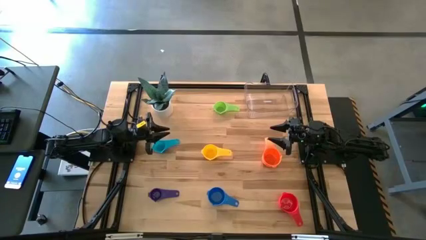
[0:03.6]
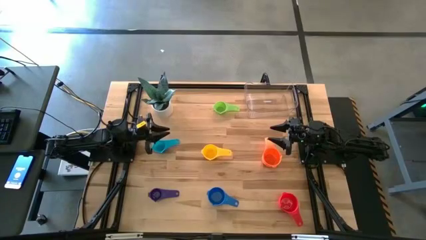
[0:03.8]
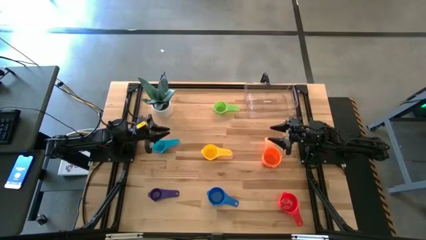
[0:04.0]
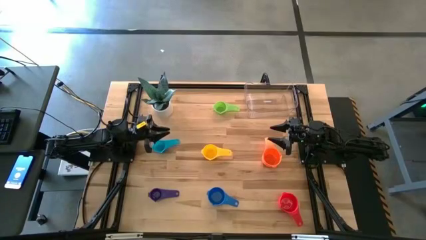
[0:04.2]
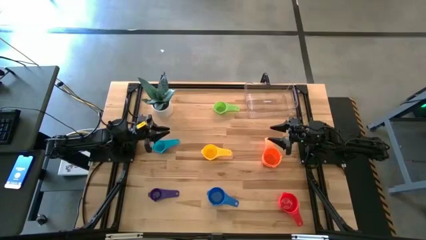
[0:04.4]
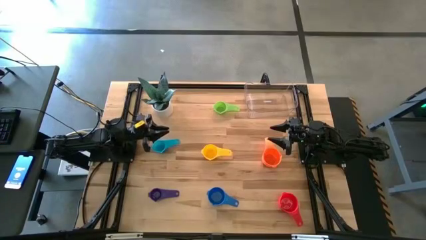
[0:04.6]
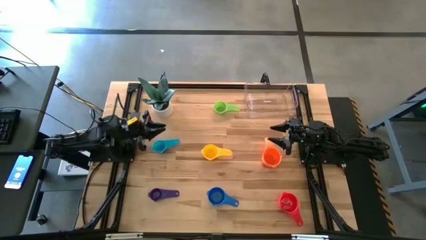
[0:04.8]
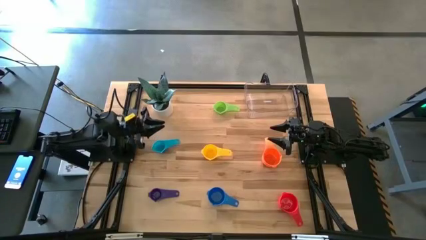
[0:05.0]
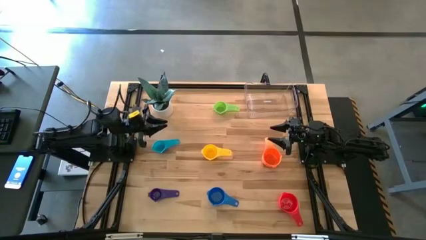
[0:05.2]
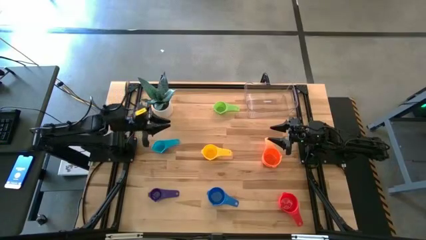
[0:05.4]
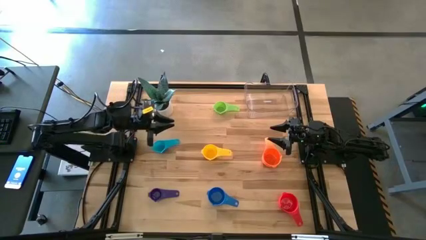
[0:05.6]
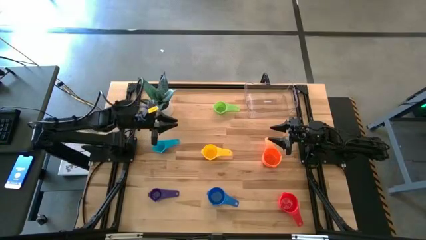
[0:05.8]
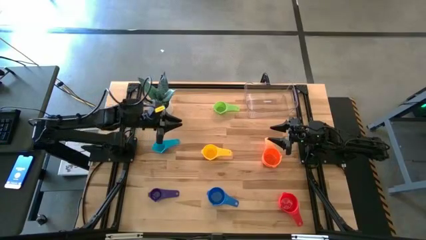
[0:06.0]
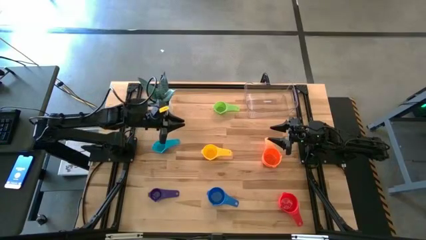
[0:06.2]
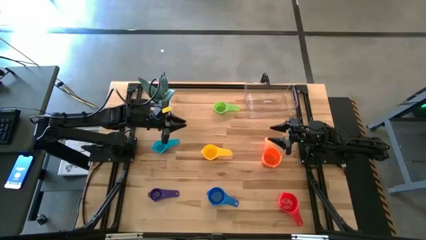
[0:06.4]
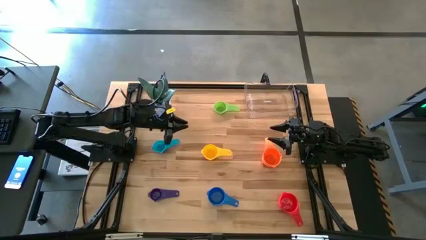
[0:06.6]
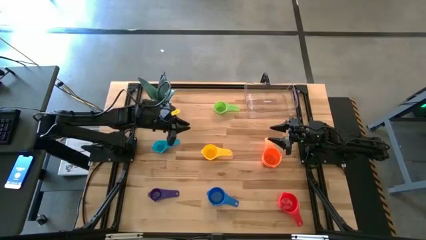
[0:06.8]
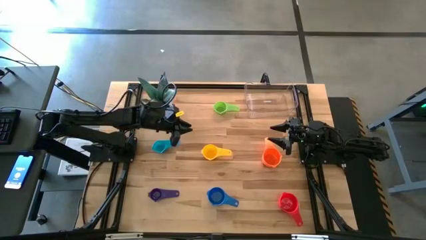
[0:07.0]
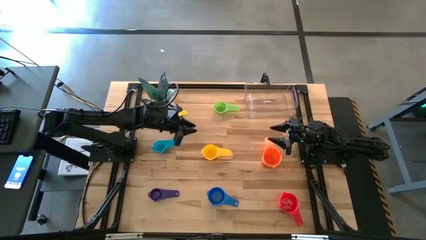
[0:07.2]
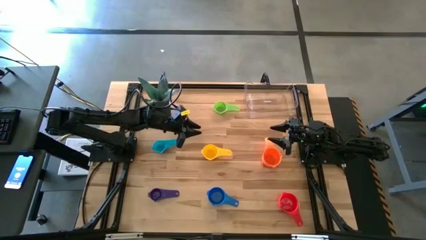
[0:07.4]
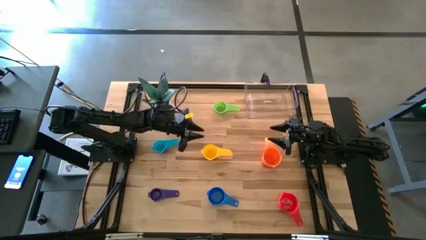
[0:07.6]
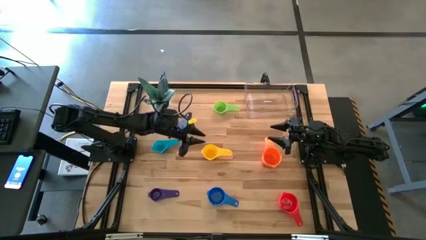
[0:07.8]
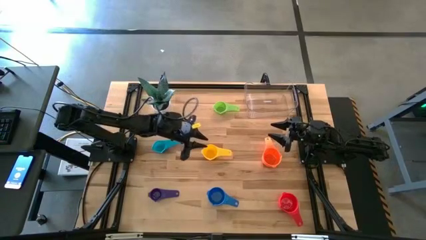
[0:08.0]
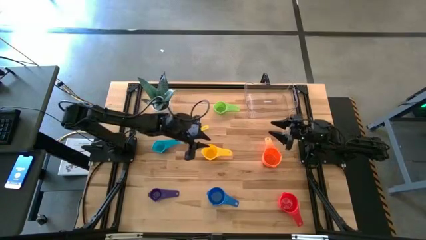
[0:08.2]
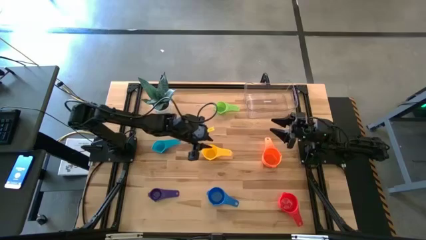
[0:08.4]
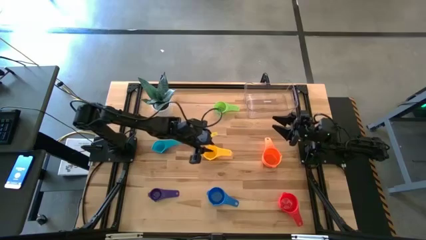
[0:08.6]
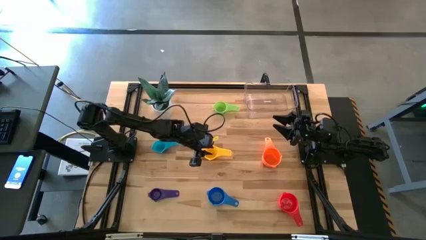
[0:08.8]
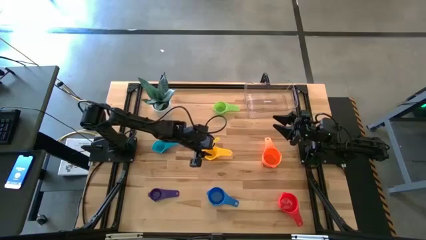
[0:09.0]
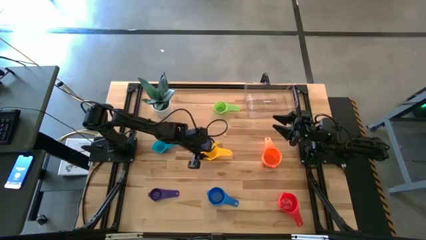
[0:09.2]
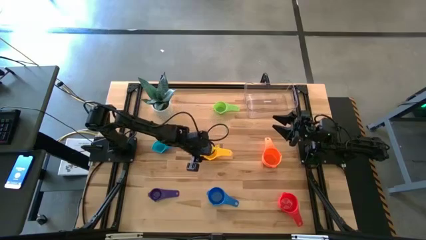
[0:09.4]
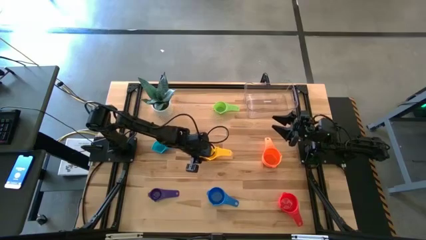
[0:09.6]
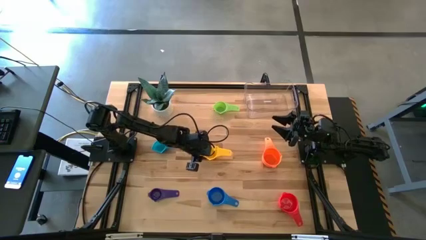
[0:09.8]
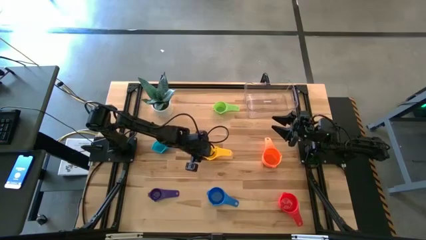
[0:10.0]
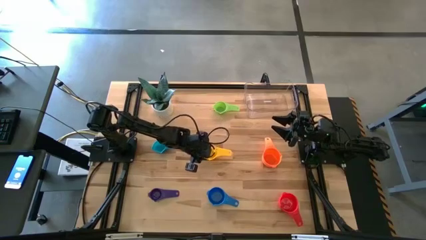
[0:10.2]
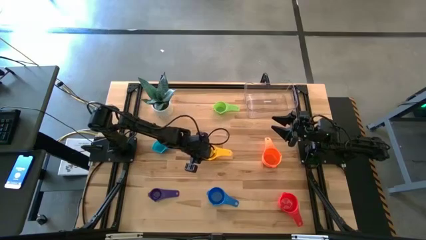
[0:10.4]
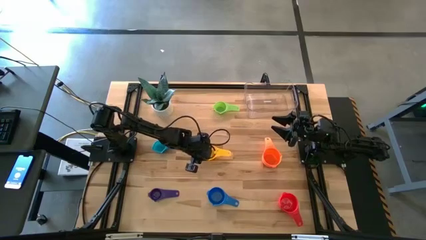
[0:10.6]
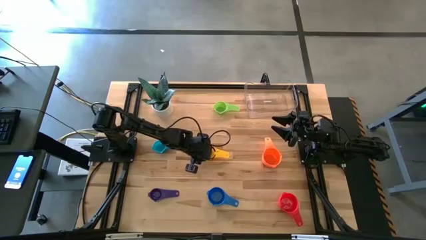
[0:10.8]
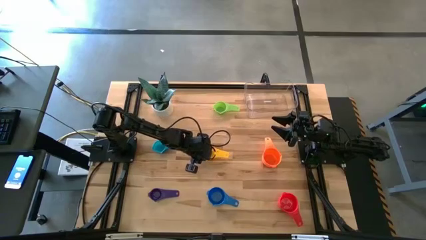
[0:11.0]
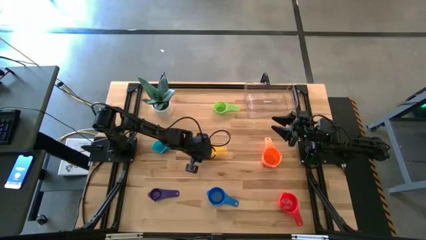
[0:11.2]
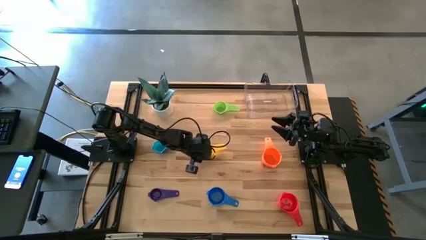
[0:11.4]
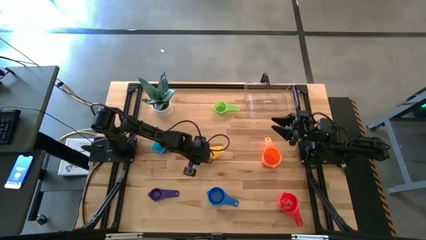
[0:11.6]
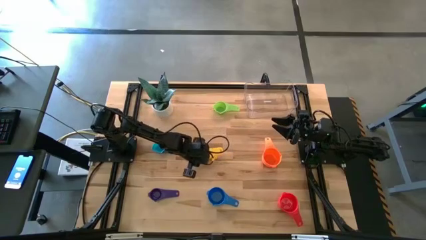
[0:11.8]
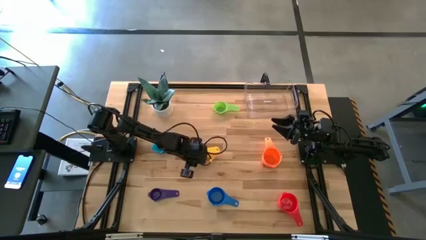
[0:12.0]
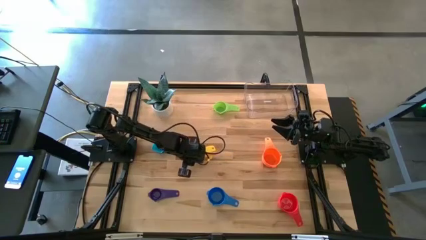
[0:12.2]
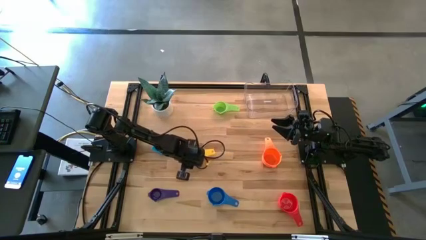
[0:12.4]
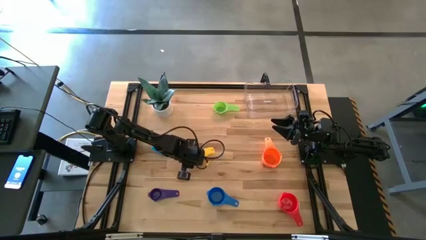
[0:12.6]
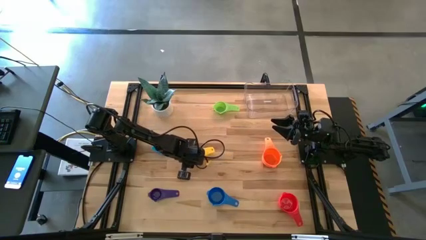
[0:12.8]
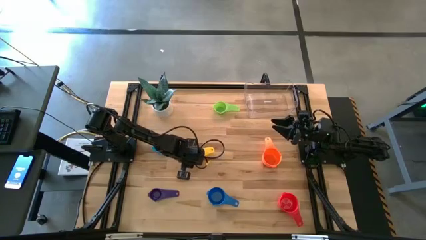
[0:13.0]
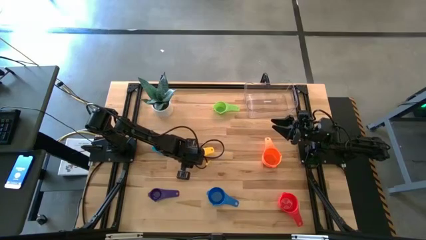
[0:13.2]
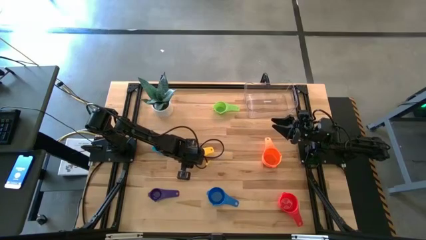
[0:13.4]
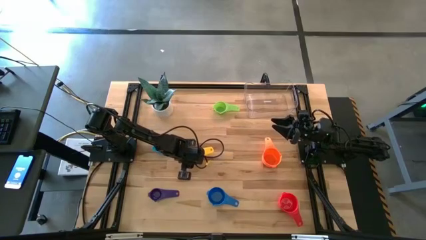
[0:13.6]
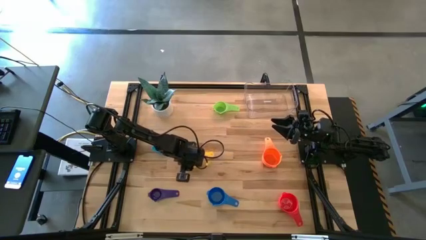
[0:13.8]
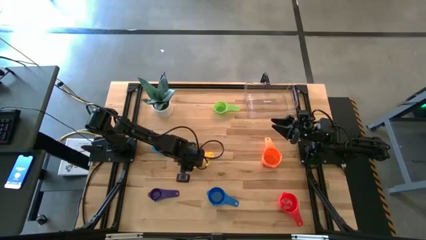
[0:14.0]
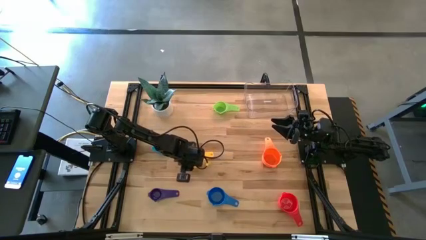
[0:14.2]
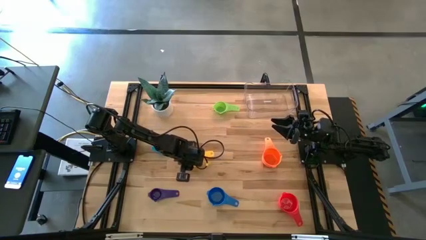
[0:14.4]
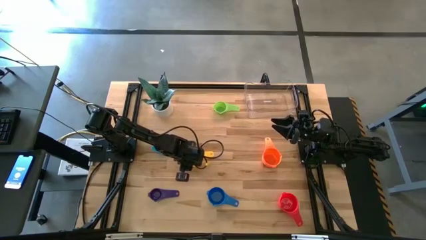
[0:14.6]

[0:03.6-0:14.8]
Task: Nest measuring cups in basket
Adjust the yellow measuring cup

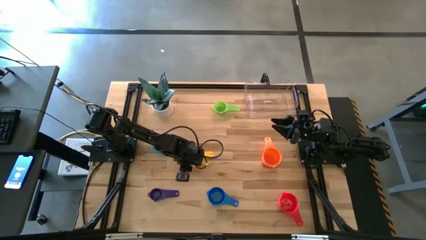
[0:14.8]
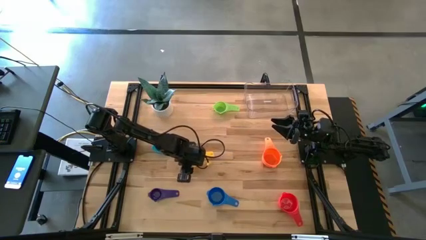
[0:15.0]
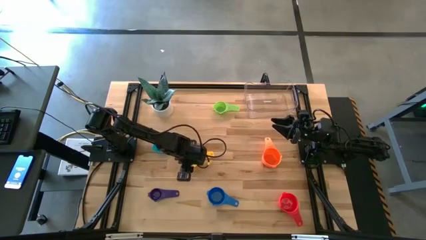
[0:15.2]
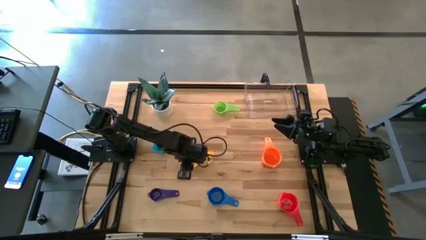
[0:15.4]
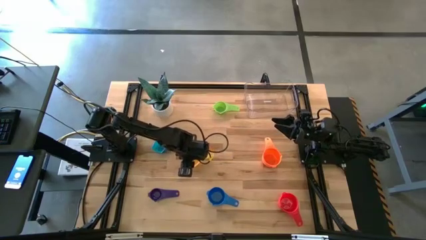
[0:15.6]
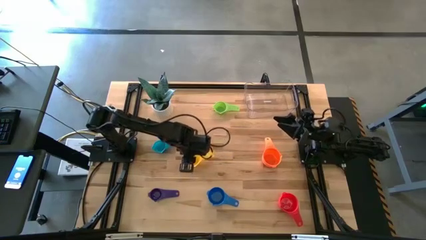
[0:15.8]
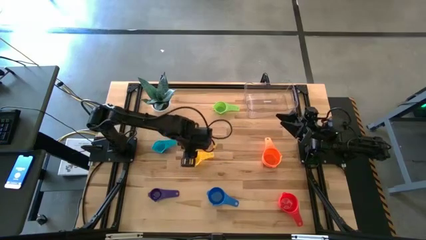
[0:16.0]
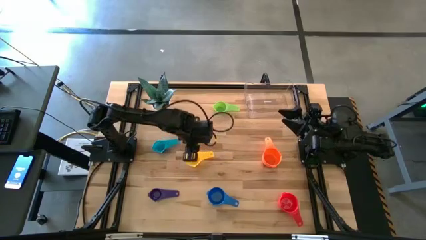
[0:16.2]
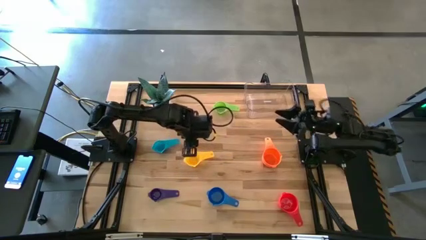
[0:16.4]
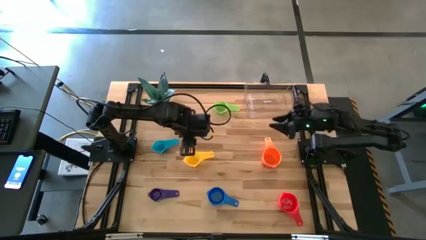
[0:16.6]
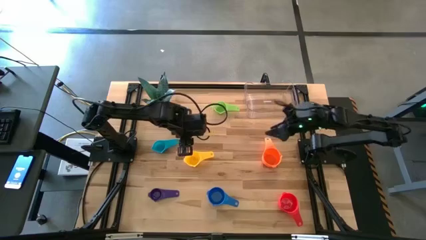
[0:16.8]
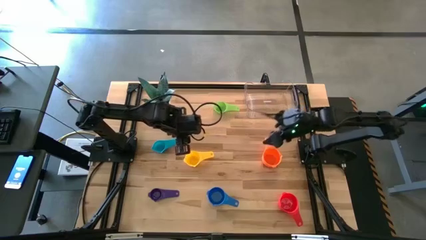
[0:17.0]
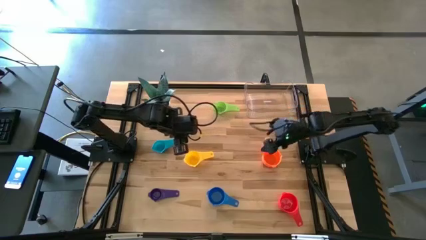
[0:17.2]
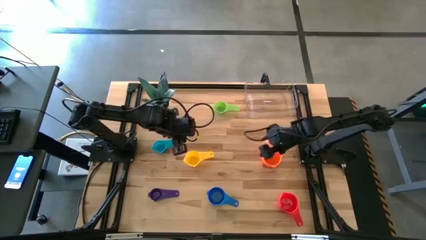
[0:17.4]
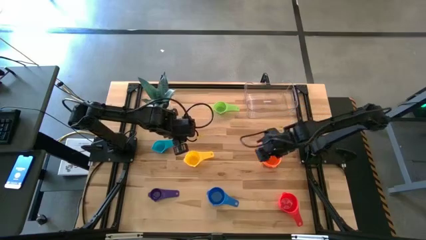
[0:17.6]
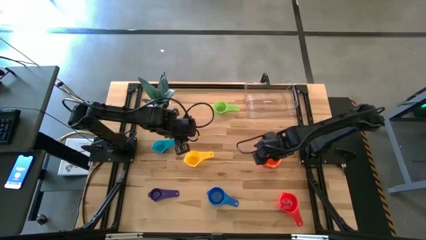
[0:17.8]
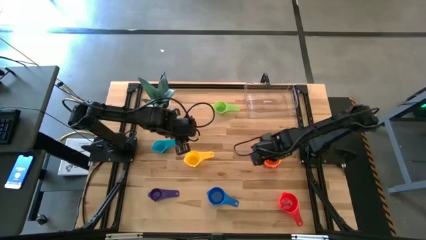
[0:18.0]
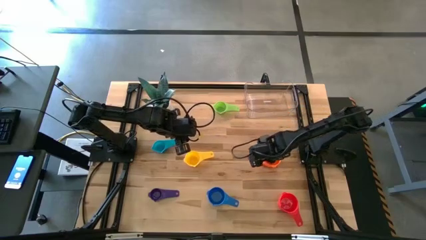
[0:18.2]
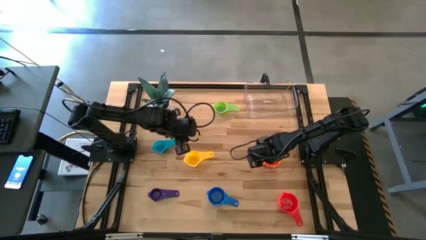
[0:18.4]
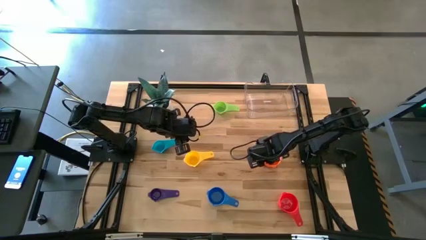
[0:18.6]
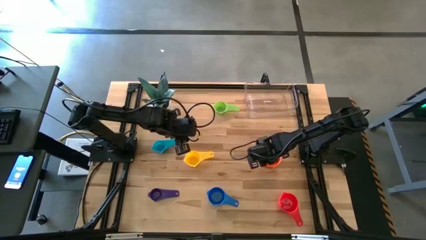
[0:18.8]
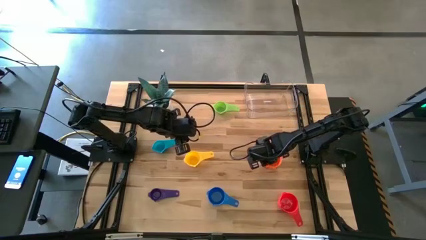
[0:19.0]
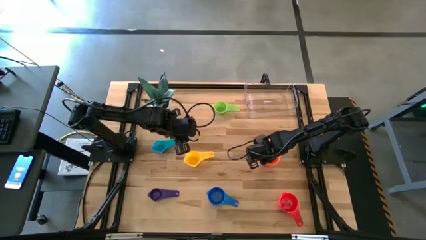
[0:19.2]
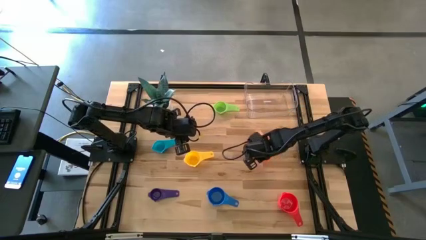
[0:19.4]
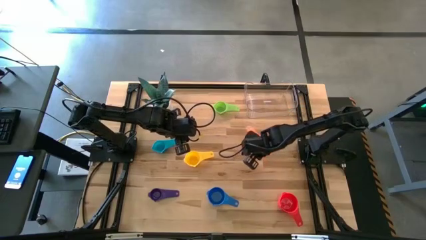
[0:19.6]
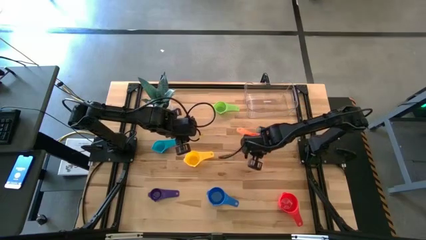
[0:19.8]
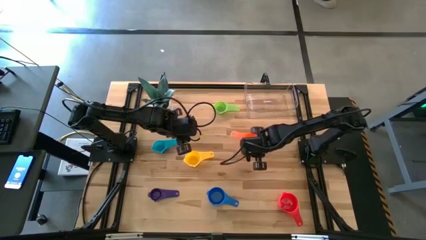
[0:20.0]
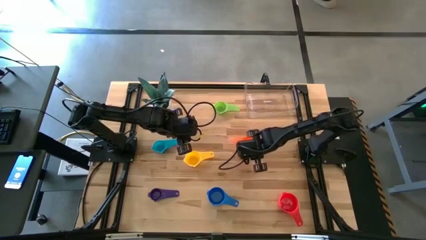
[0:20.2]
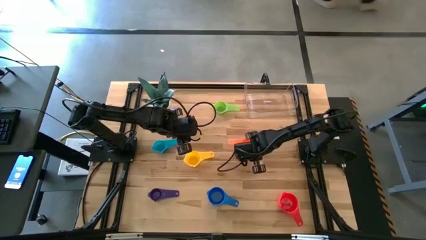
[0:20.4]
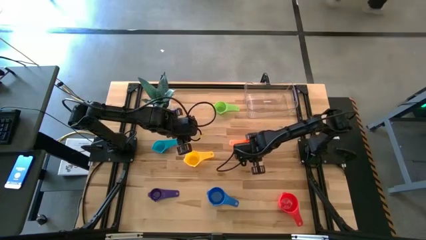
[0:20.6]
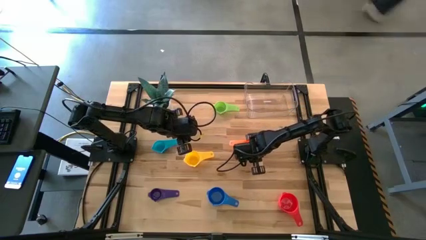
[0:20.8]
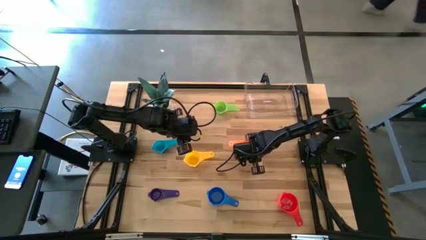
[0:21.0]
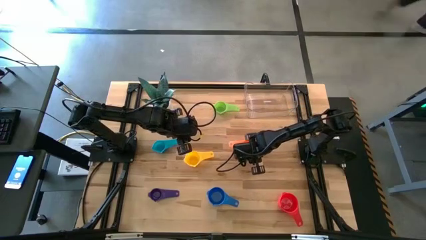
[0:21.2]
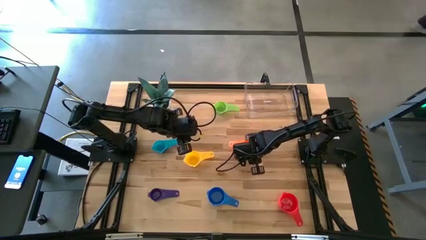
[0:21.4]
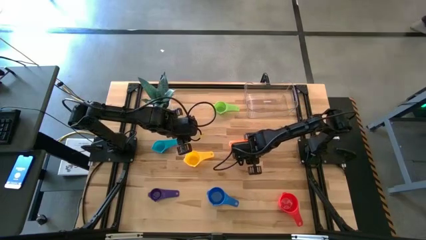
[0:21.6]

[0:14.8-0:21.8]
Adjust the orange measuring cup
